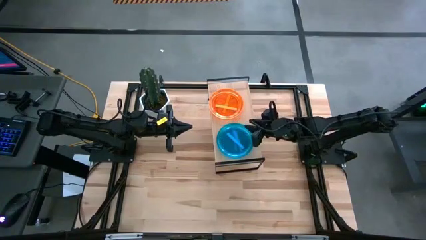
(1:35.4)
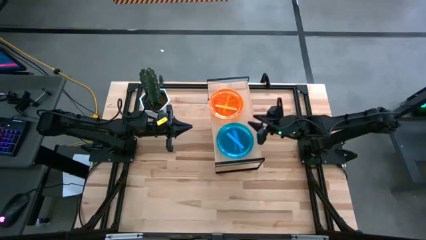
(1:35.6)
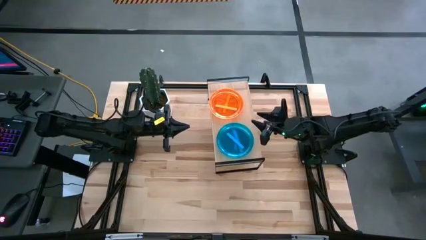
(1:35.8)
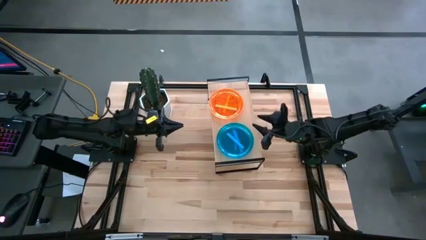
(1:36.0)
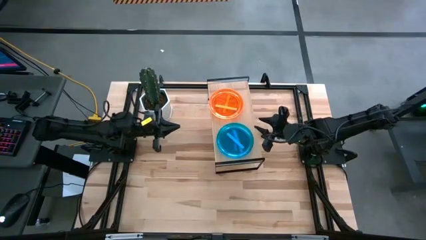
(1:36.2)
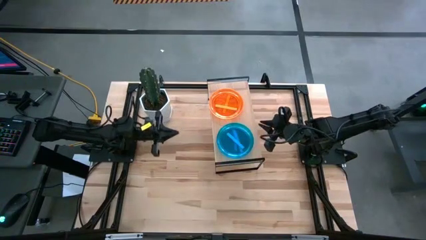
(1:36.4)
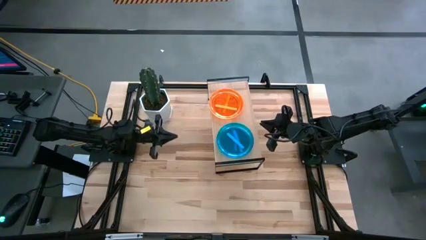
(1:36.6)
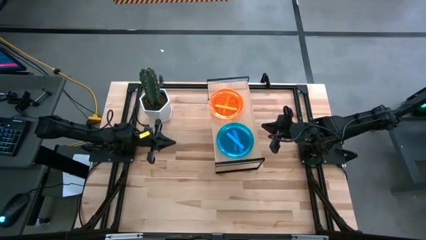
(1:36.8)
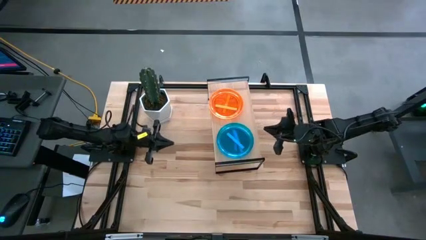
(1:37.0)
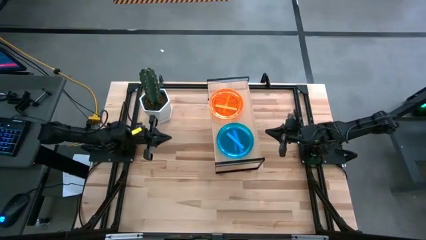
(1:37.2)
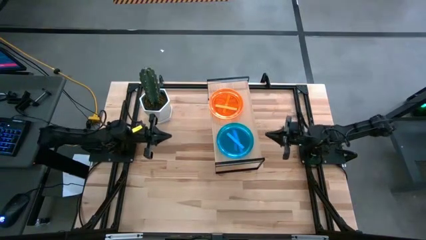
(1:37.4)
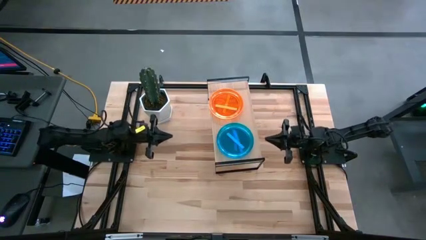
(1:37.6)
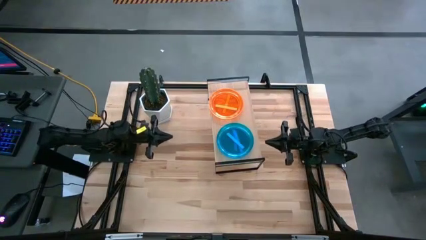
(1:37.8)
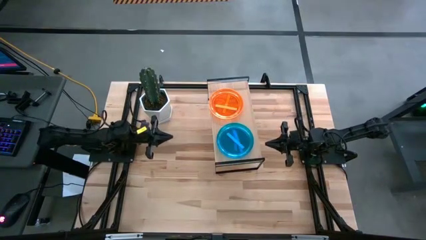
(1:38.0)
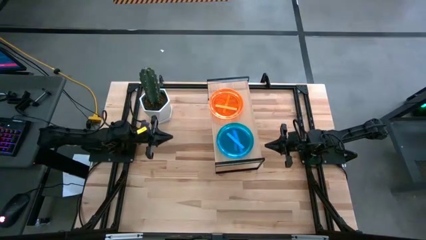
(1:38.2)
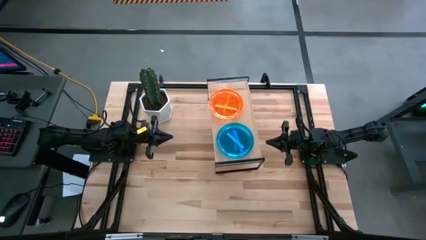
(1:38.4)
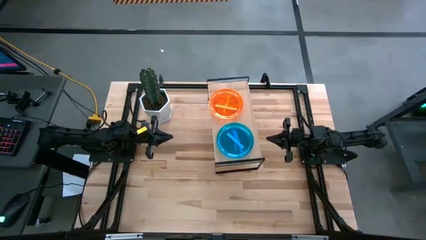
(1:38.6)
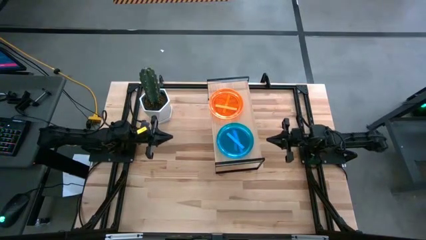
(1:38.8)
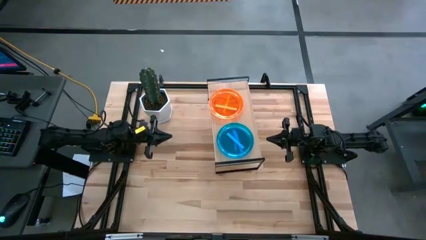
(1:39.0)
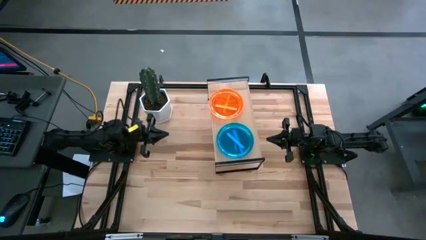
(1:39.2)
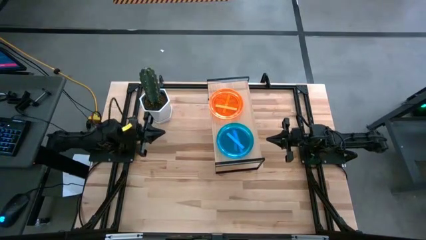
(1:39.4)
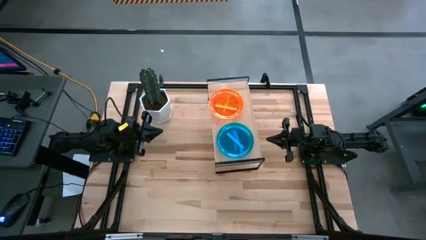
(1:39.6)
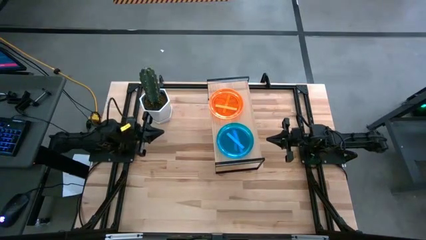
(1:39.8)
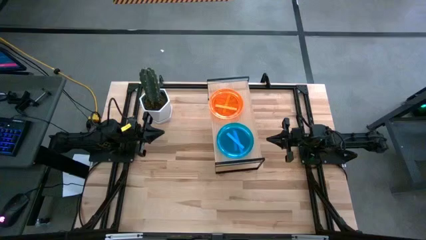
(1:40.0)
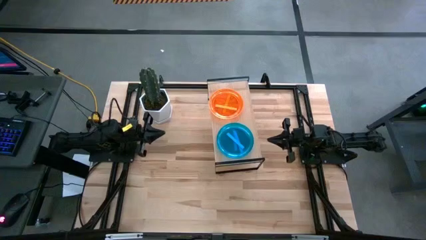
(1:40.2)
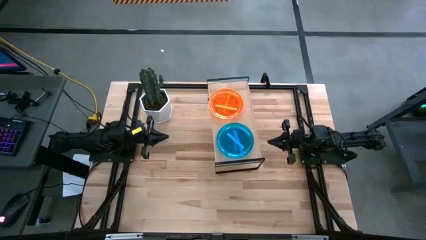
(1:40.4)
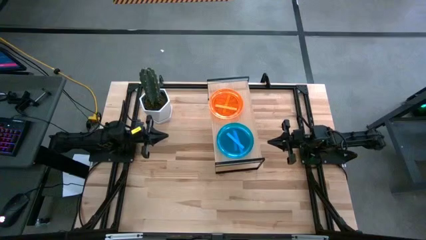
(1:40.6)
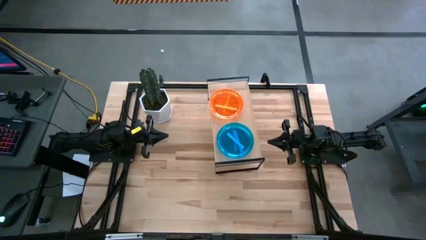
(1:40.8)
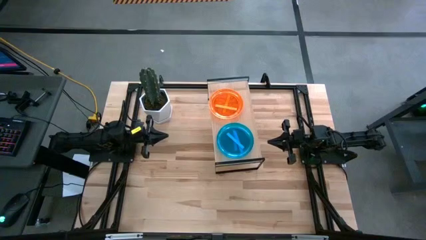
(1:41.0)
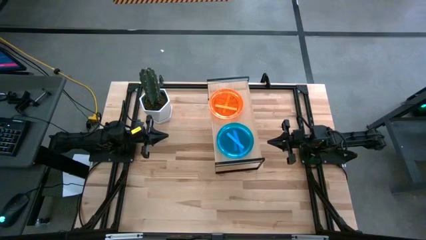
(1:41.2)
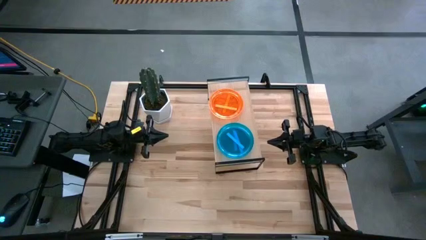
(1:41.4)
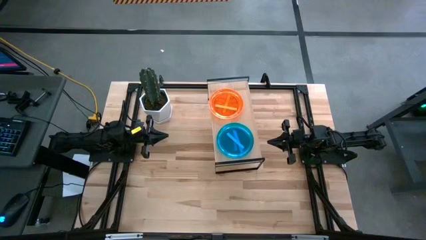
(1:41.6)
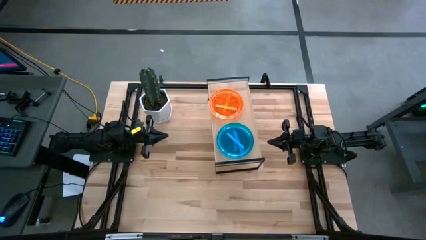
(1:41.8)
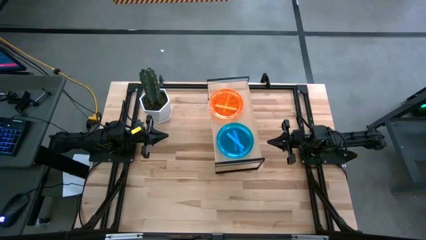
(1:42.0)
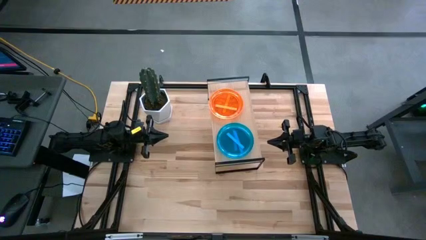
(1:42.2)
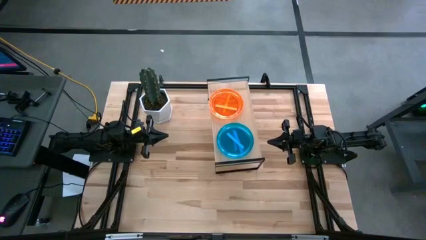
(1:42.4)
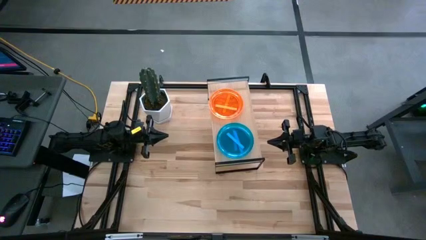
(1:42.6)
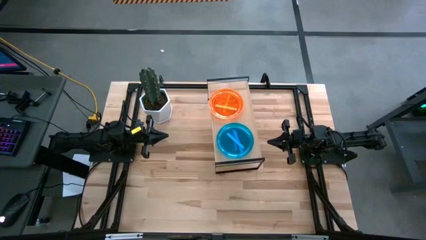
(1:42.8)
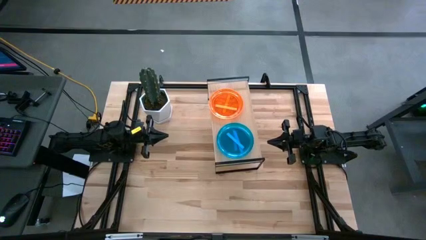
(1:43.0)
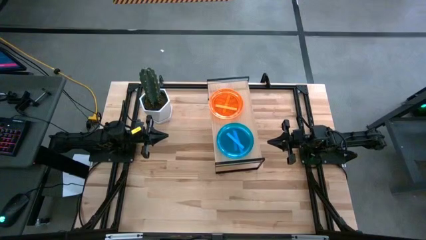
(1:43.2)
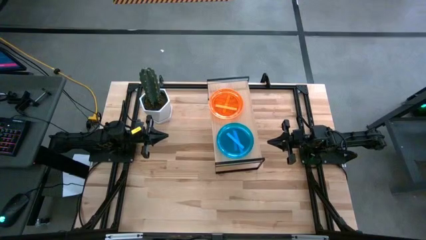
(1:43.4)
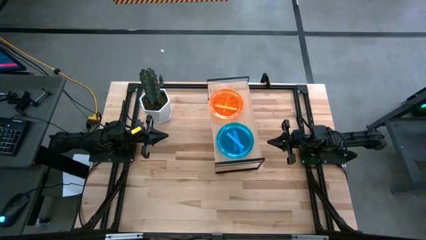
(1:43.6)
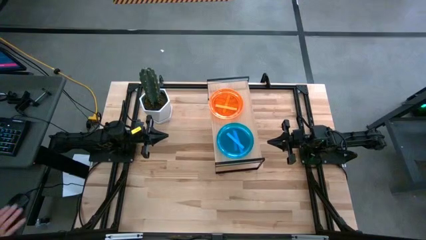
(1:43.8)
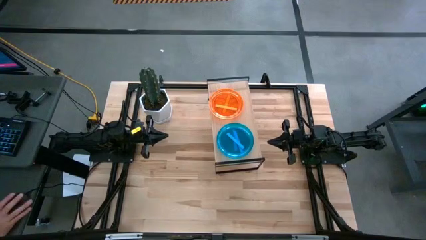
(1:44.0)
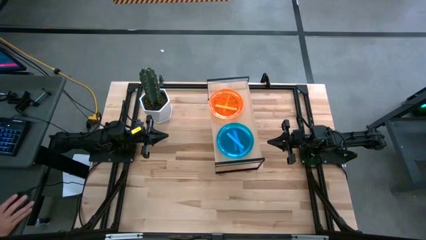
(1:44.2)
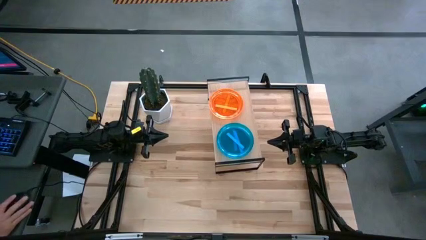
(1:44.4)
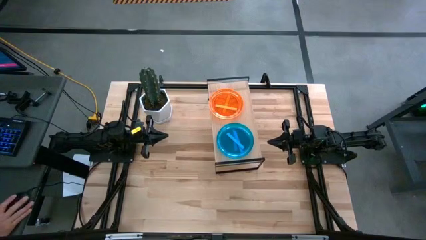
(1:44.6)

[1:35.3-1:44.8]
Task: Place and stack plates onto a shelf
Return to Home Position

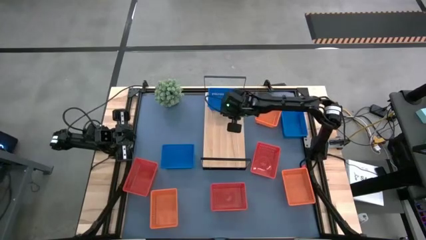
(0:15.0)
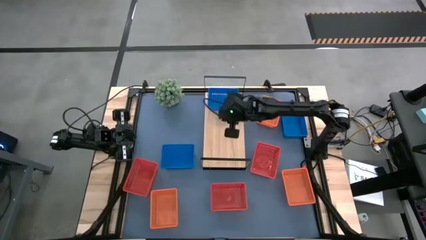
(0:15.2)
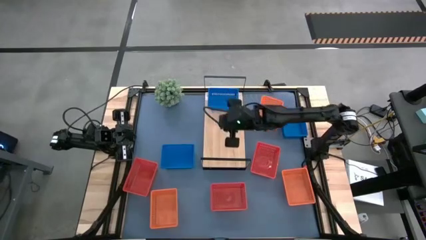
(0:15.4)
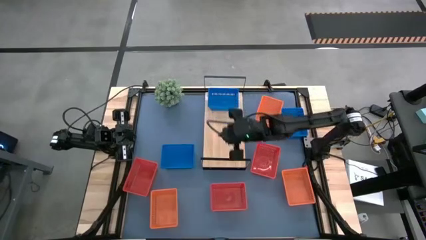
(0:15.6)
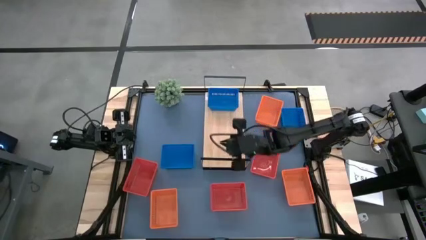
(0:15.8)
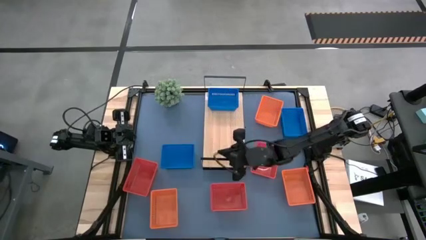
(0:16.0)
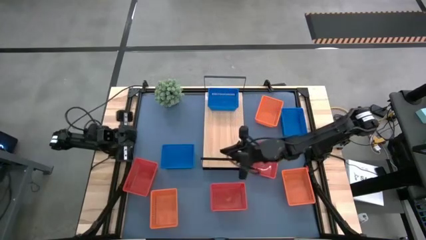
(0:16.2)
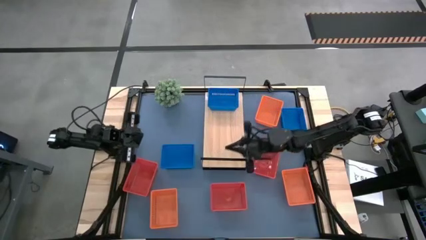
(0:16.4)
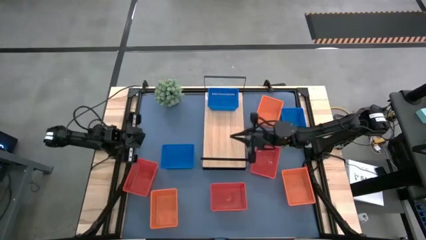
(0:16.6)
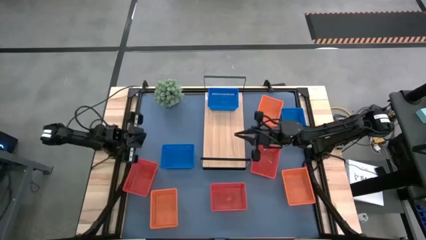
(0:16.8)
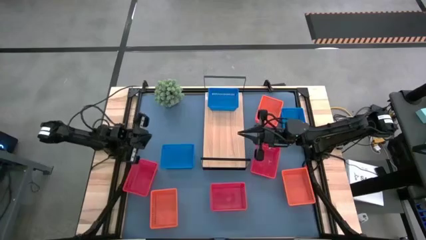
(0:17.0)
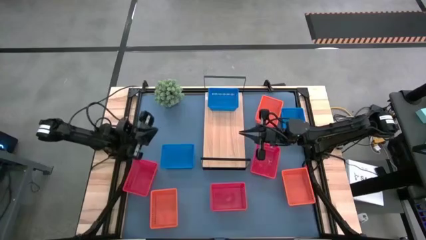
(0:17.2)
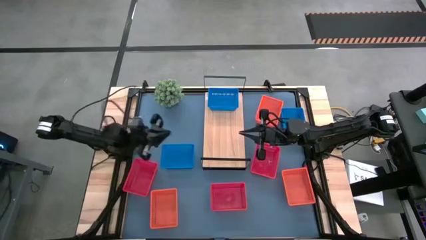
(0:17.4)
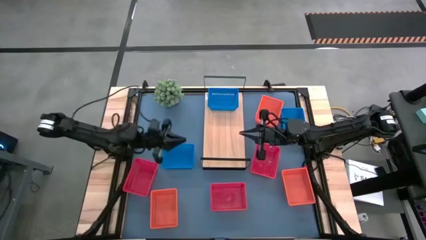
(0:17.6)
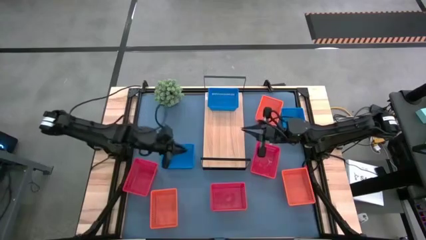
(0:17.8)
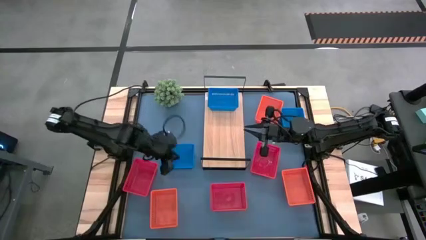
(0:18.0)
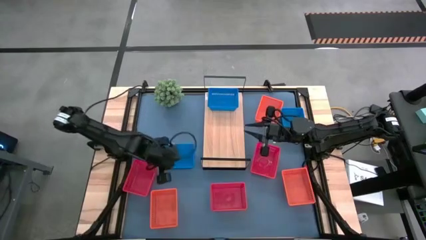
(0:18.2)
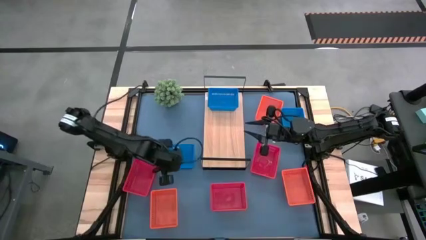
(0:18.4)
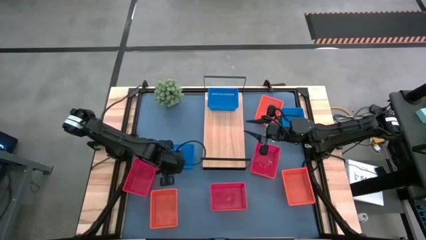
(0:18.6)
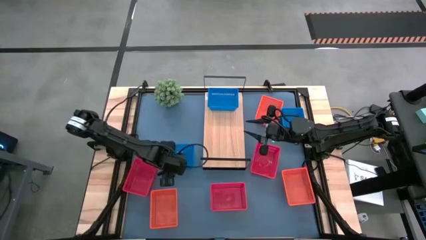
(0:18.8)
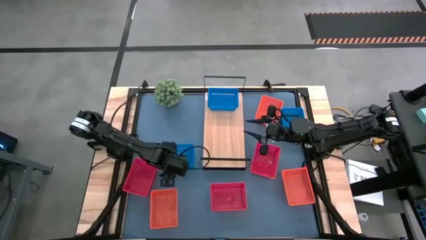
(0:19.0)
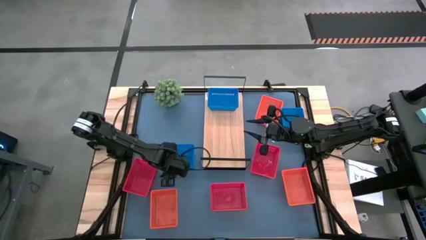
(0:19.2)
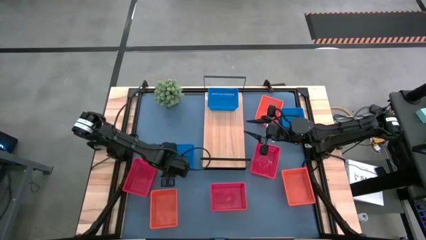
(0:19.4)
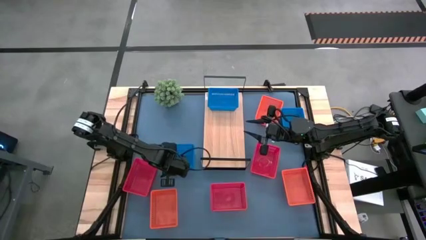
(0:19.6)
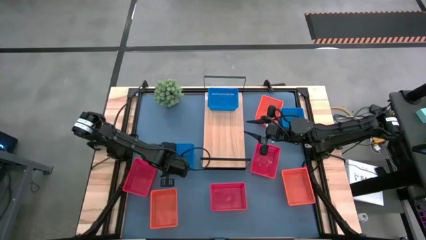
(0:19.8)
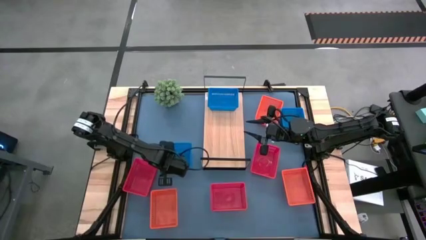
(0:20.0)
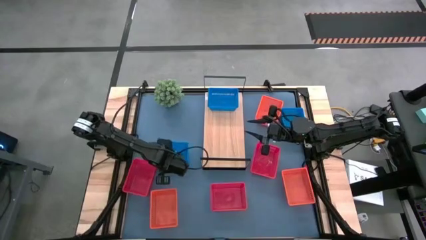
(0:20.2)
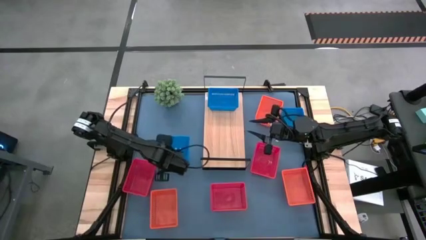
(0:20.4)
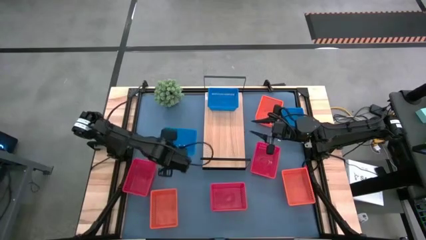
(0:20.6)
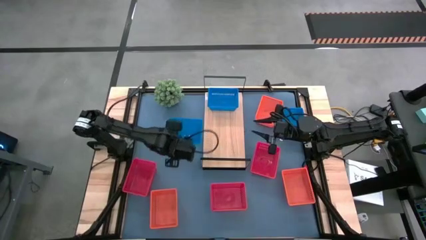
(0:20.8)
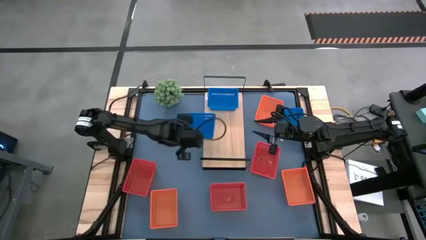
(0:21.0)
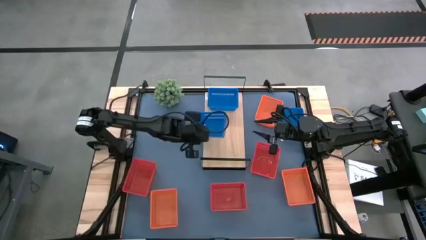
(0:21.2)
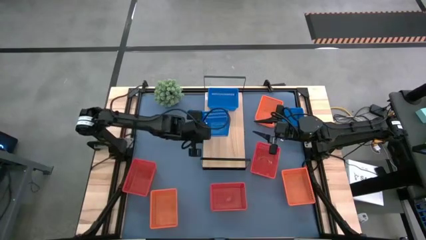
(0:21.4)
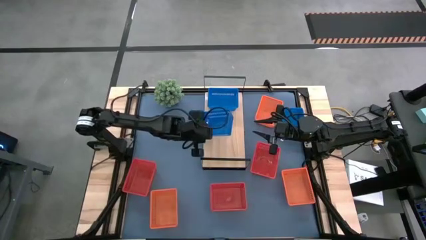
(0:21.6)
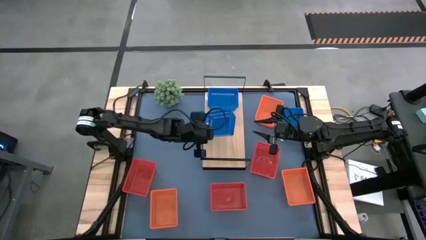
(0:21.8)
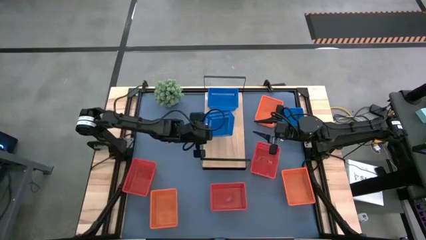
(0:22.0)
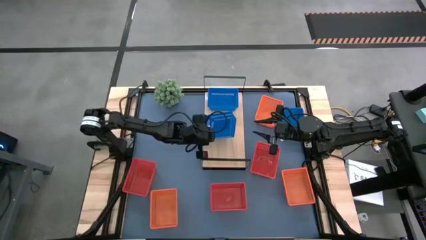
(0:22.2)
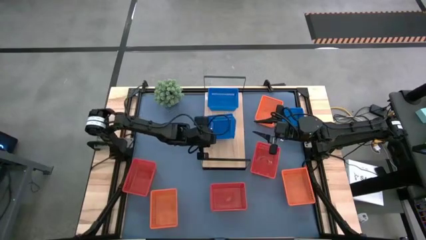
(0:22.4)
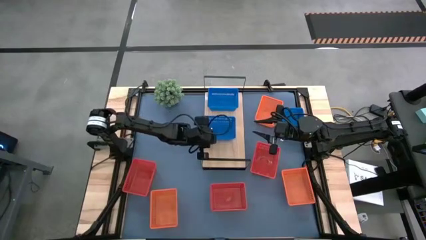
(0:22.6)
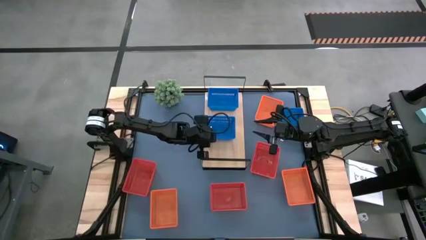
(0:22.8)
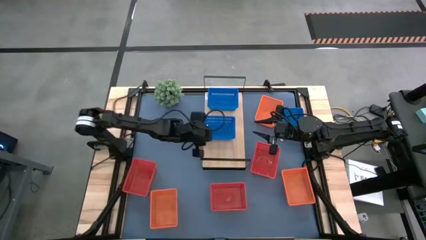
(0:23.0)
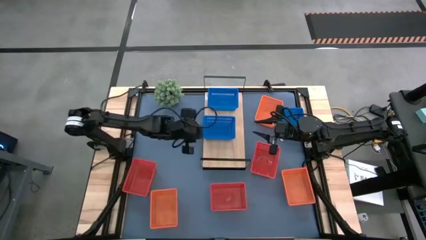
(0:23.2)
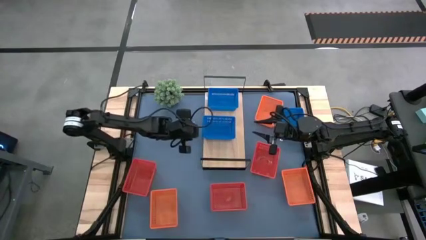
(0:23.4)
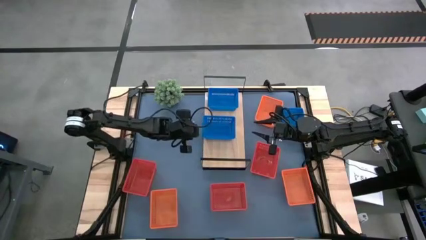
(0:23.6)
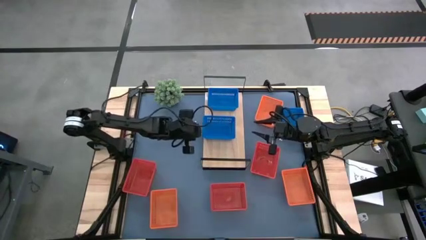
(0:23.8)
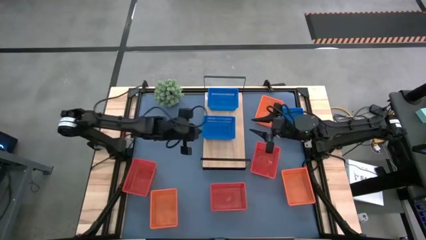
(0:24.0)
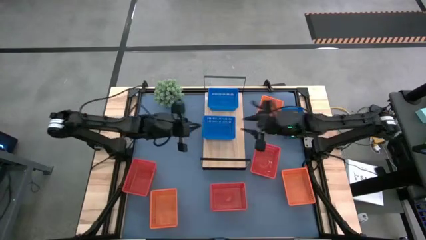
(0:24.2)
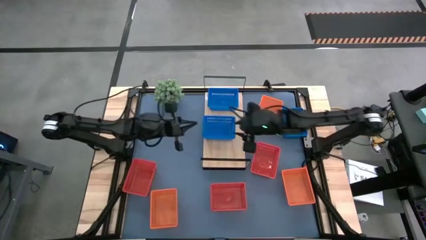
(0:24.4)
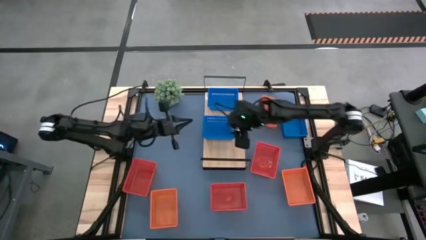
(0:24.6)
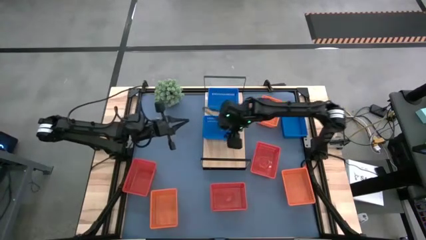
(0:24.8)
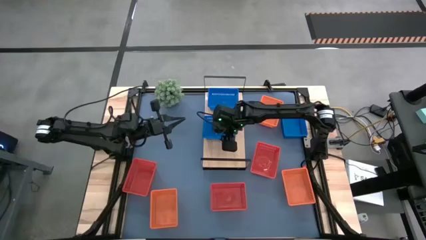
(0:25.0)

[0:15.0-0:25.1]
Task: Stack baskets on shelf by color
Stack the left blue bin on top of the blue bin on the shelf
